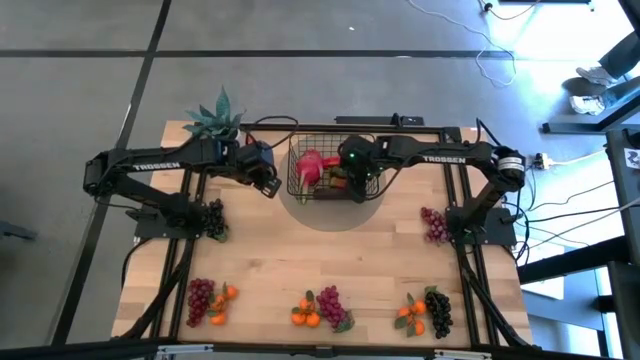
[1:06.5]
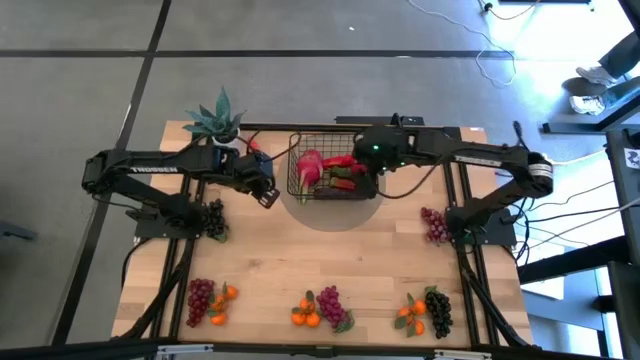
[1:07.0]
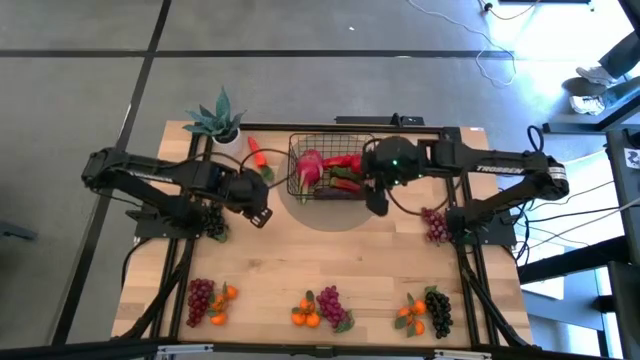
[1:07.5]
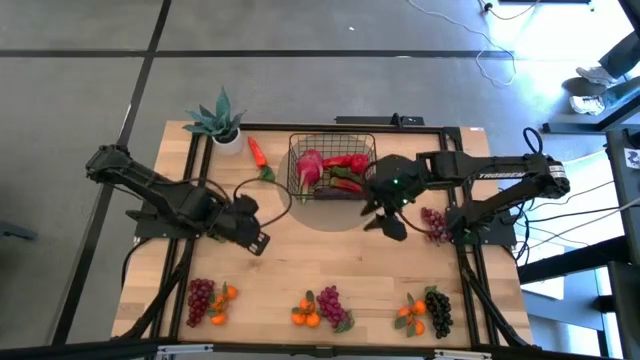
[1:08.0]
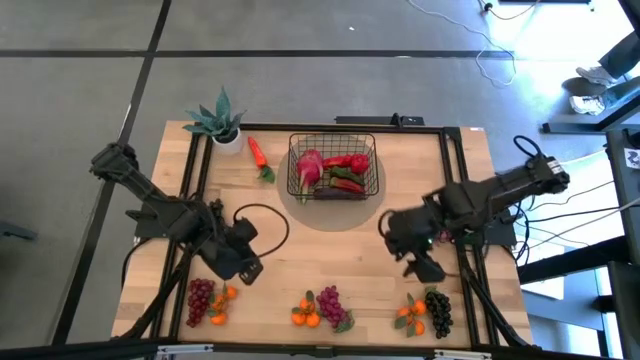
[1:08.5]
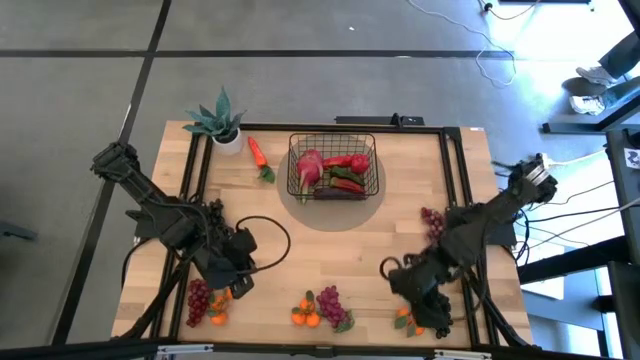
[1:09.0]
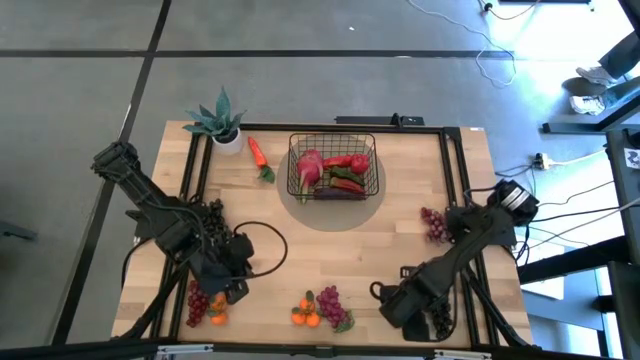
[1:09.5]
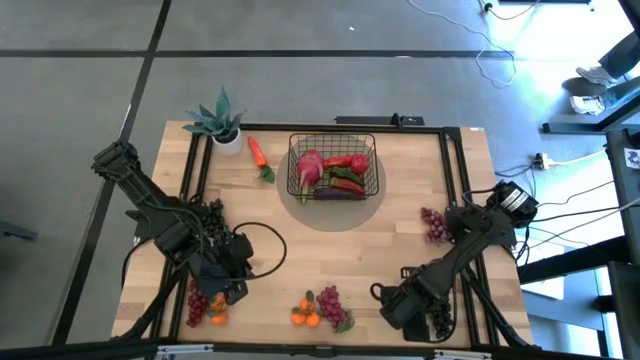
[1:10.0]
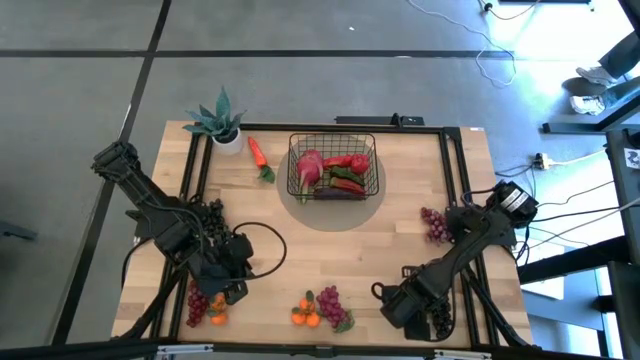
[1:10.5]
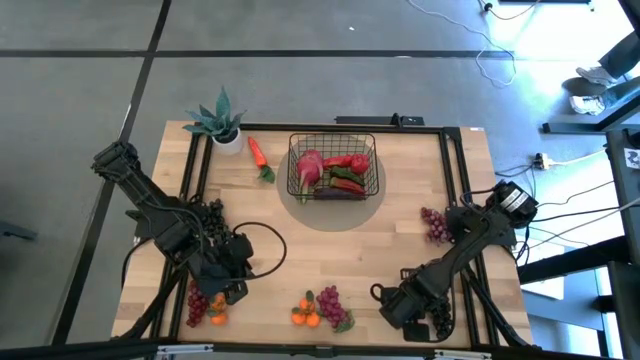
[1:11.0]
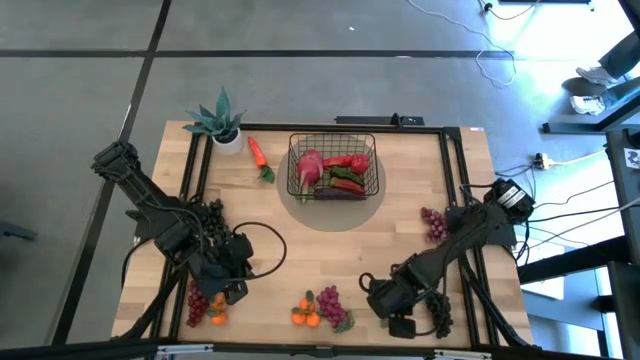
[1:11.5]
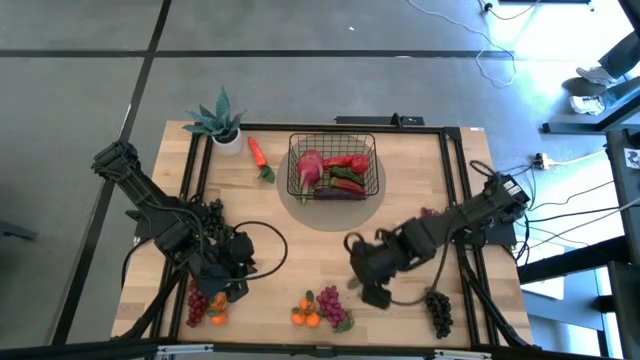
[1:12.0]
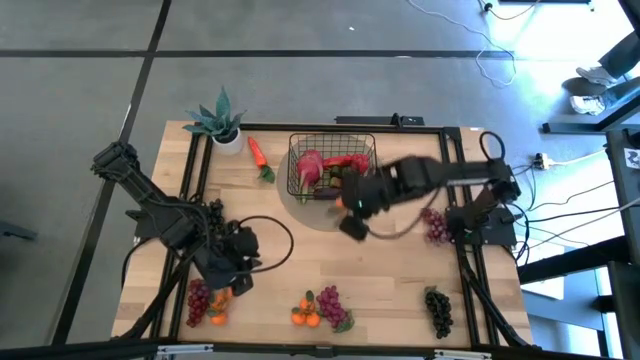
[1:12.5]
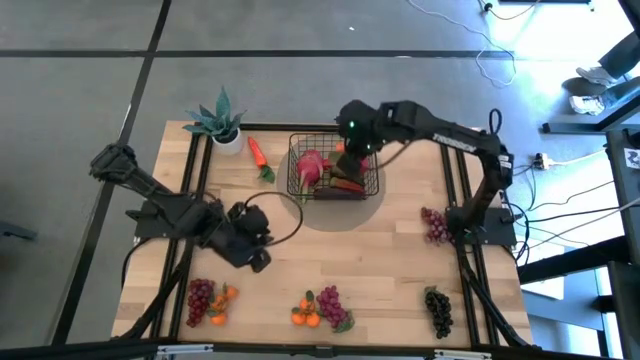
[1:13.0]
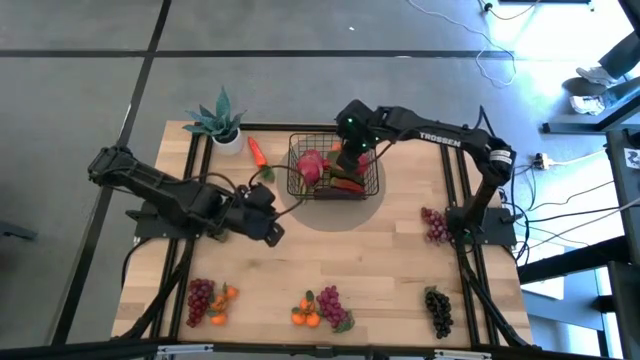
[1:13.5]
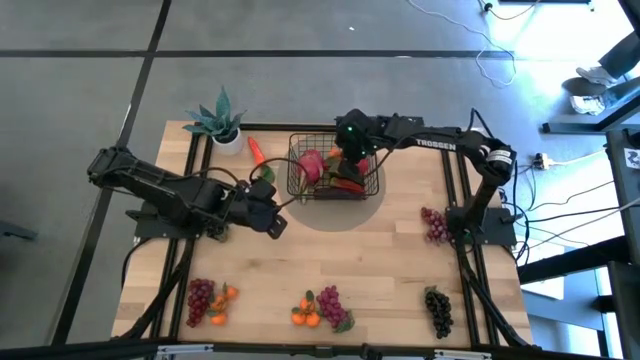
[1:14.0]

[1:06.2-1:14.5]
Task: Build produce basket
Put the right tangerine into the black wire basket

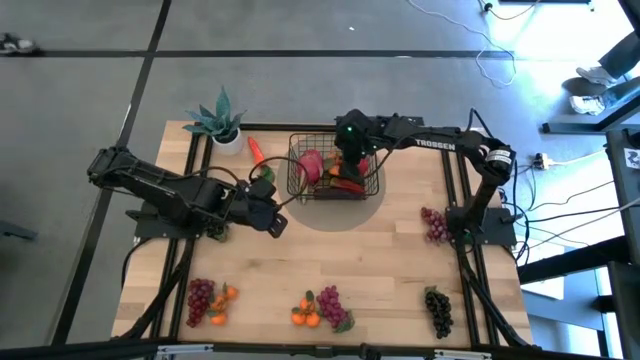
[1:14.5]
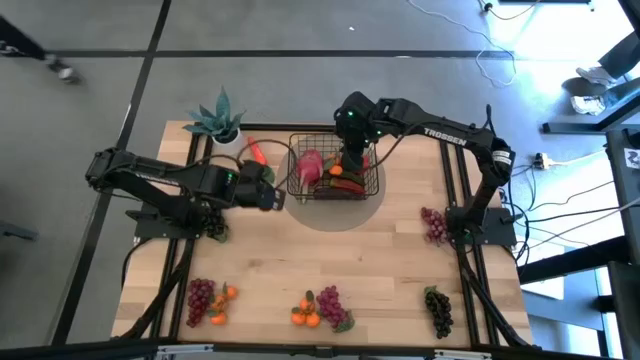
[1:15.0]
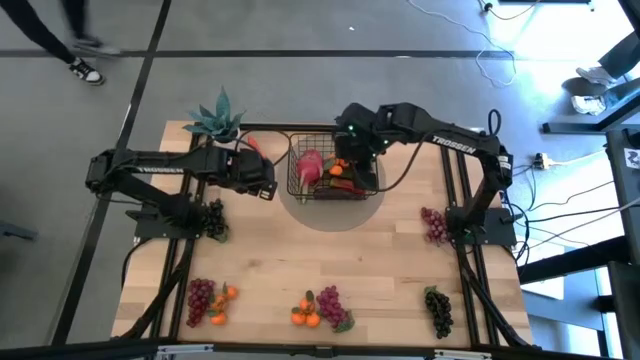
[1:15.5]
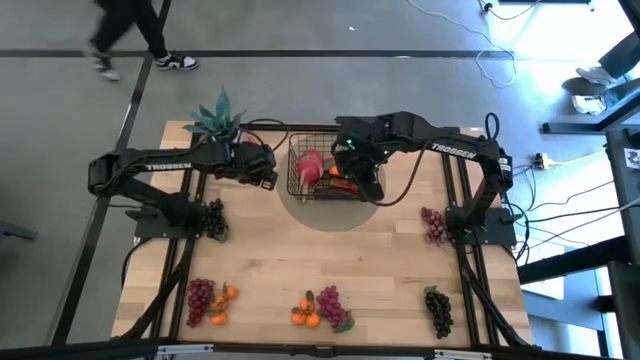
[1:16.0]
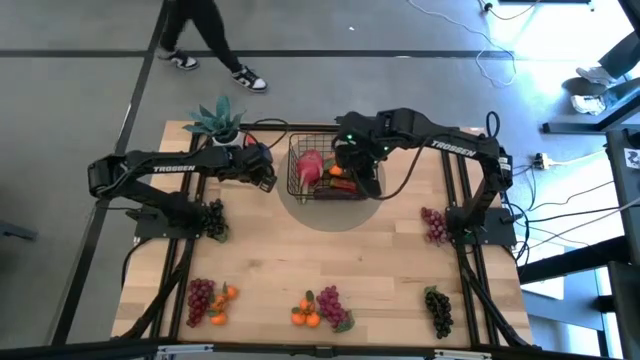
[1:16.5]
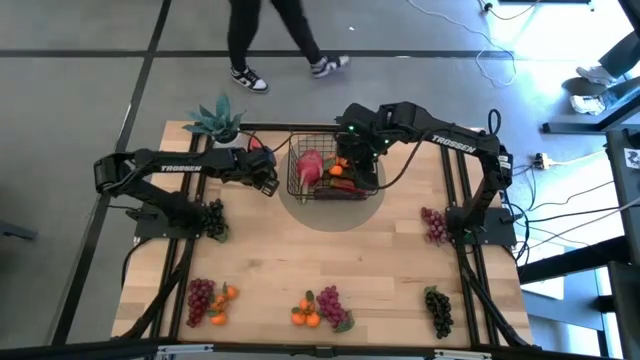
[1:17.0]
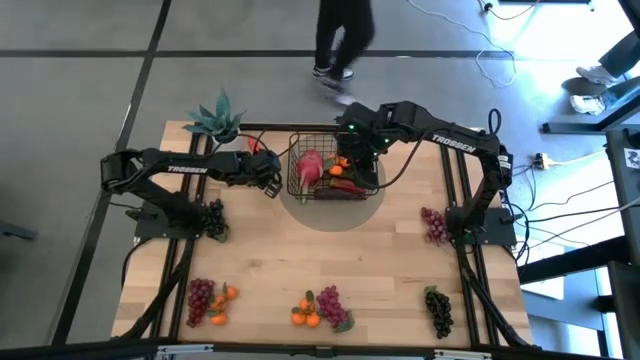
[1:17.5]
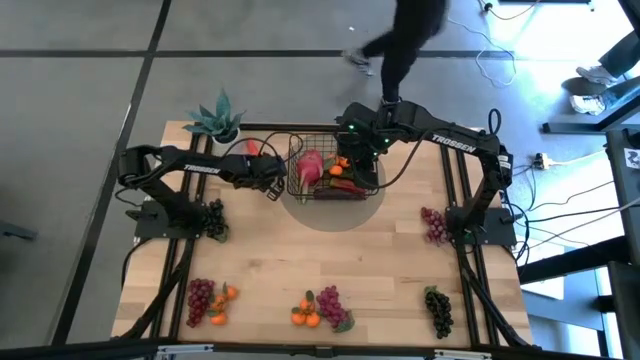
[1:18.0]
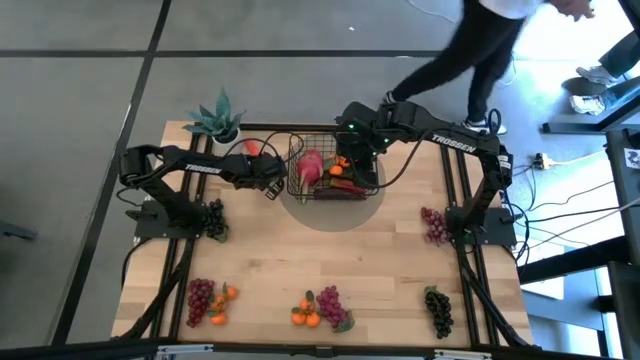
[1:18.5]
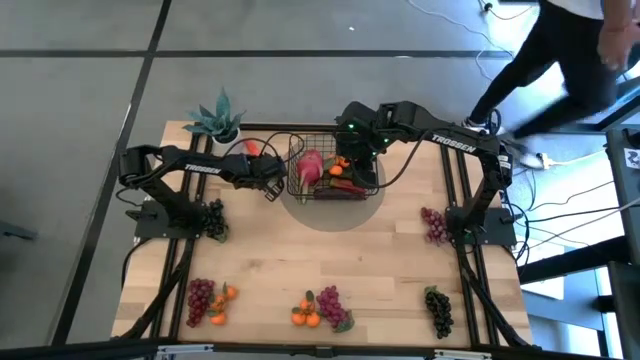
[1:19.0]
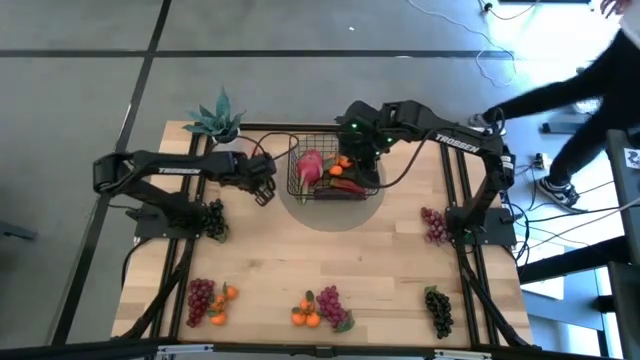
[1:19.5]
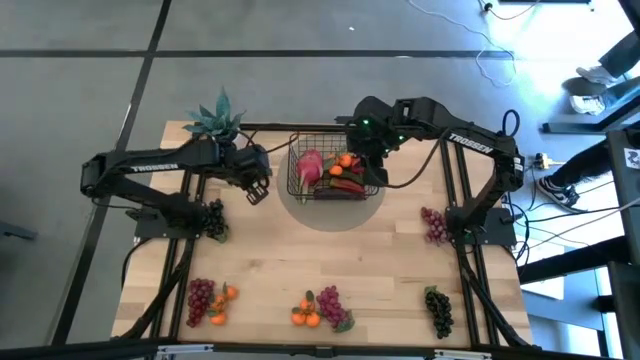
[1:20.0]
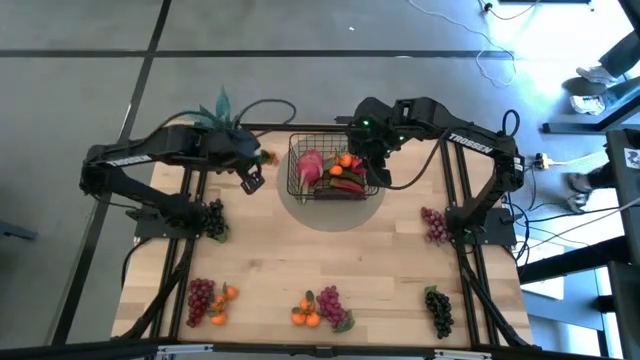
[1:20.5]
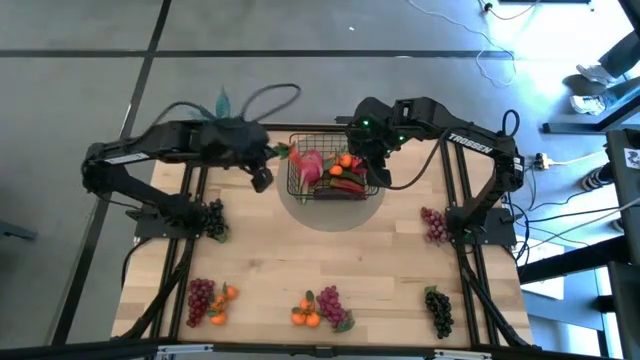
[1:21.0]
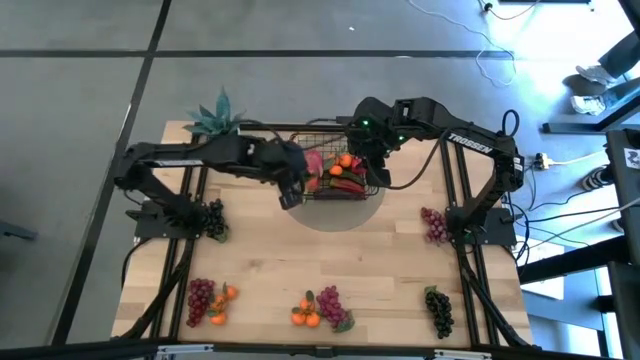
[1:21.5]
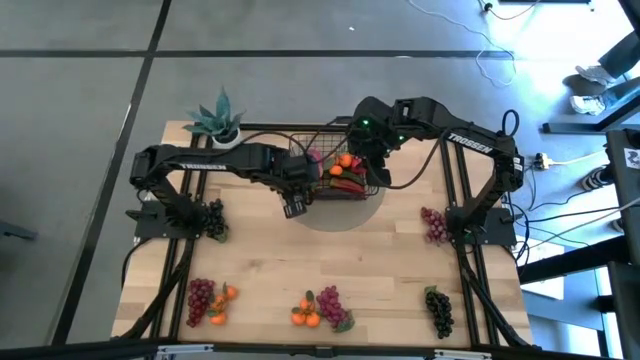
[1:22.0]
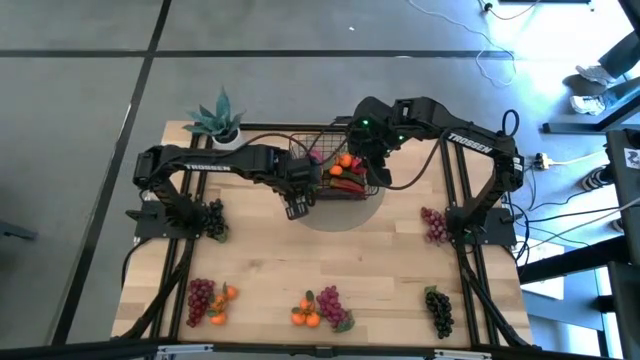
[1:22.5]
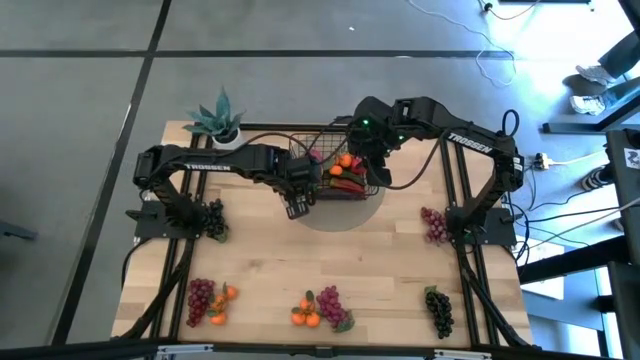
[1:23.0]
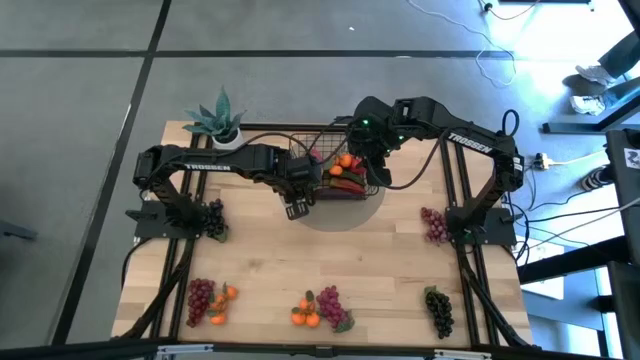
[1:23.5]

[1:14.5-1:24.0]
Put the orange carrot into the black wire basket

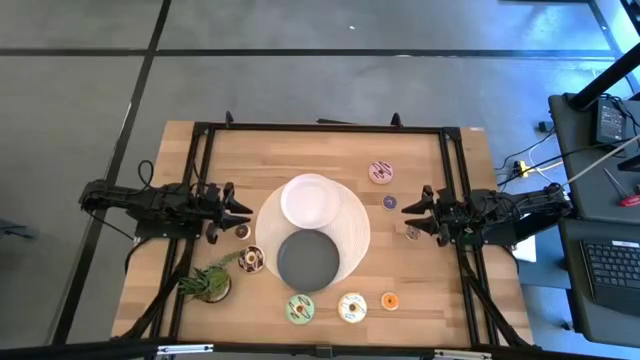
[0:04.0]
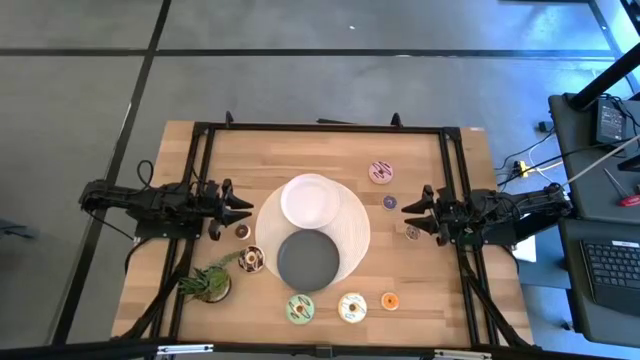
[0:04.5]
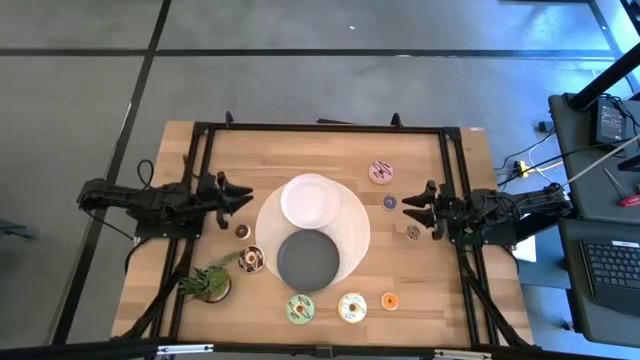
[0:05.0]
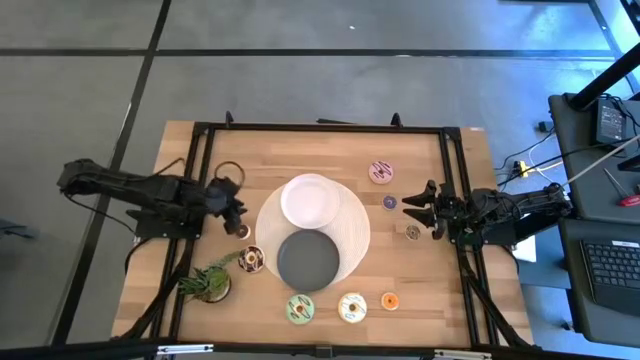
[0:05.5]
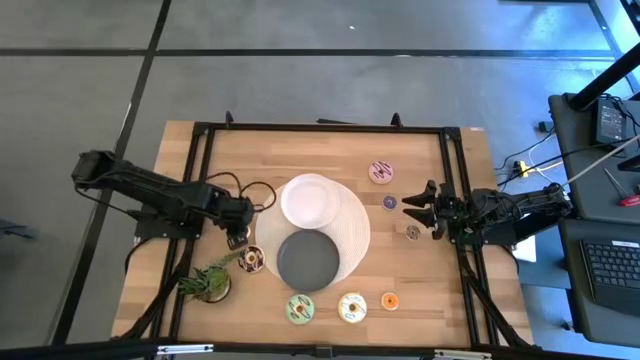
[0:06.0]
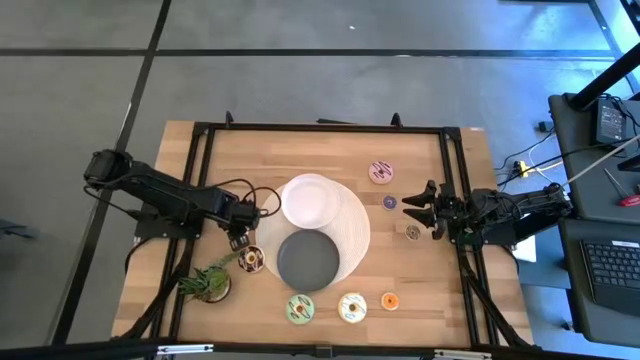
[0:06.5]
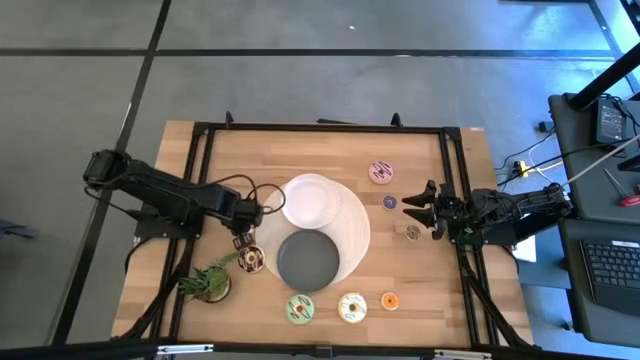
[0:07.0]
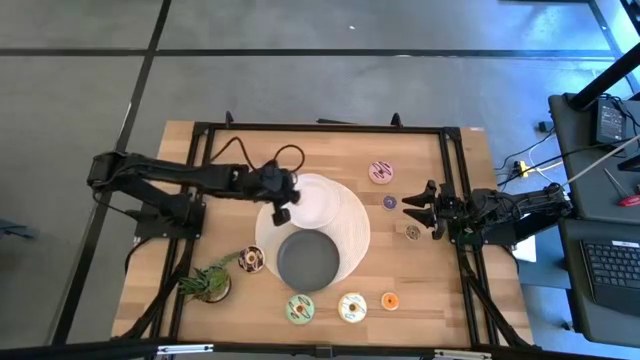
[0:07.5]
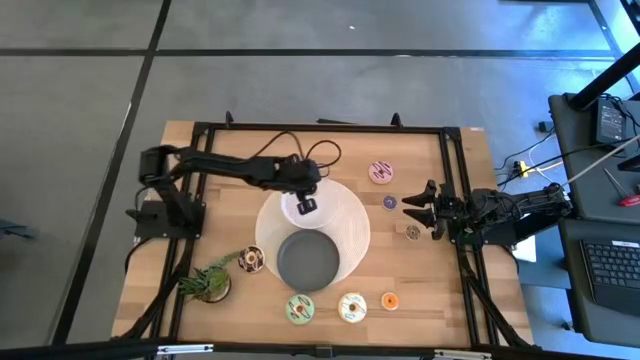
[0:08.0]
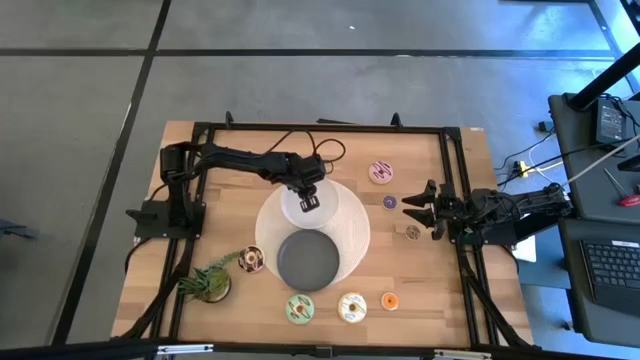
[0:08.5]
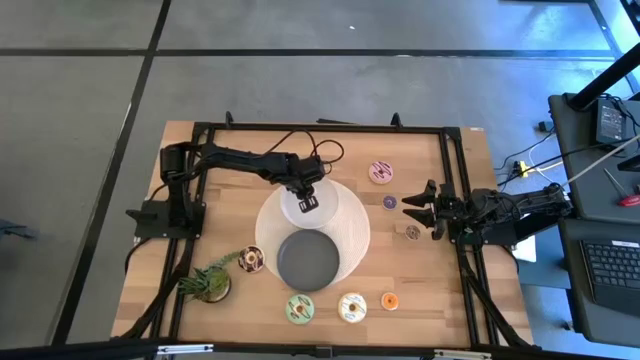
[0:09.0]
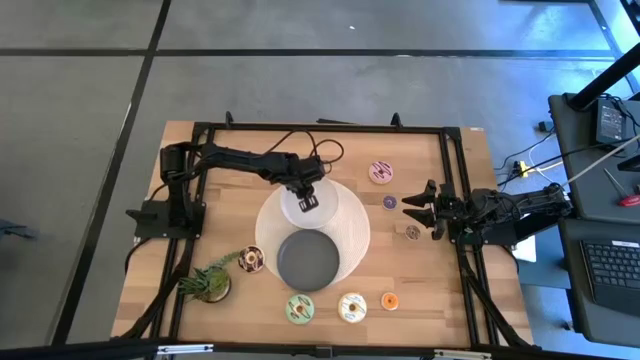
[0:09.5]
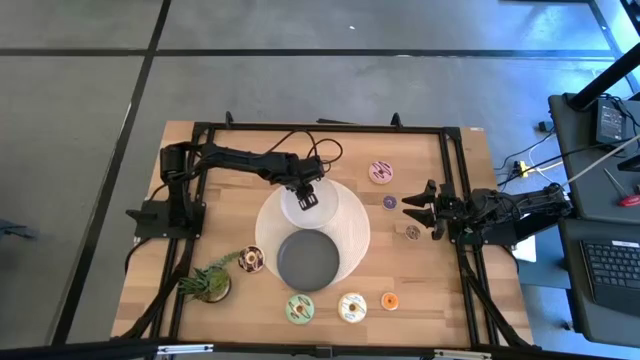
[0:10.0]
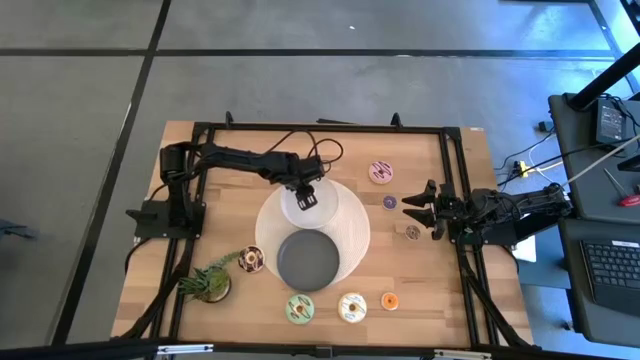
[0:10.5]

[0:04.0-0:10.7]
Task: Pick & Place donuts
Put the small brown donut on the white plate
